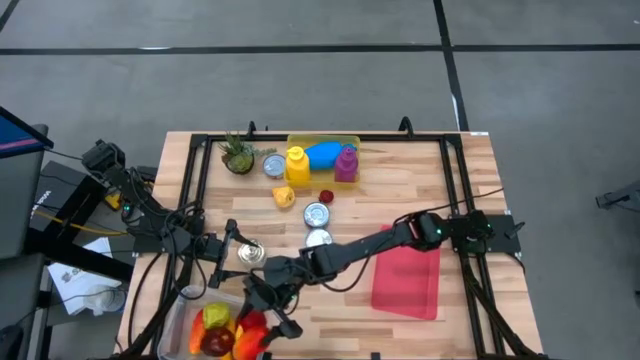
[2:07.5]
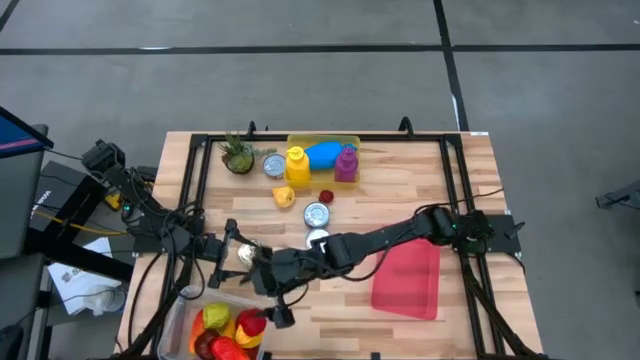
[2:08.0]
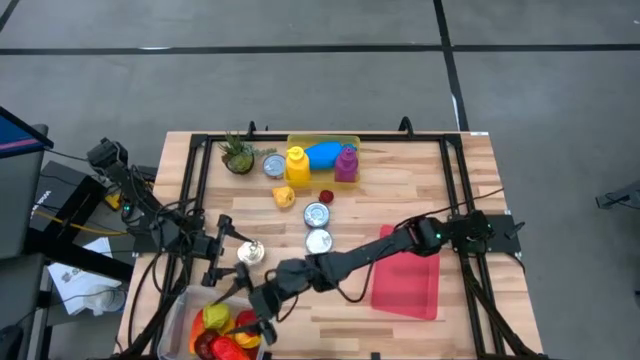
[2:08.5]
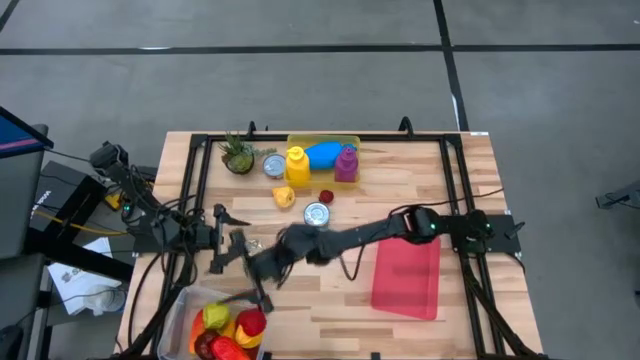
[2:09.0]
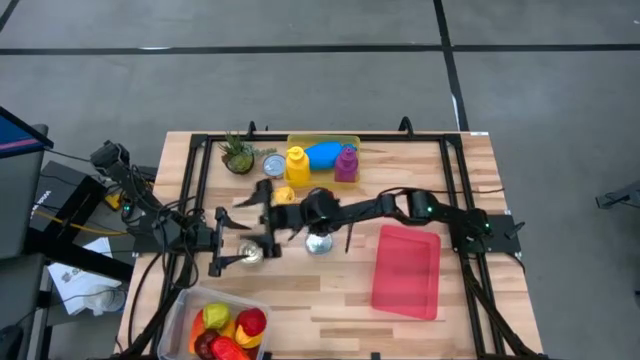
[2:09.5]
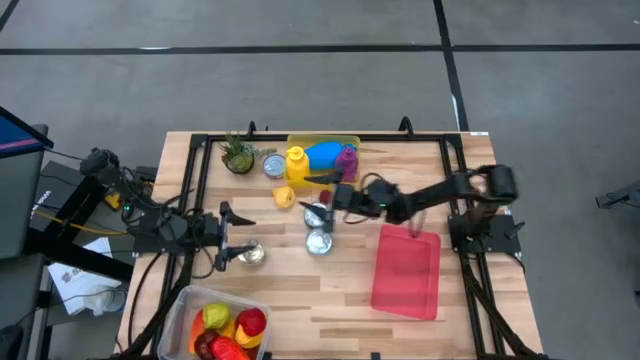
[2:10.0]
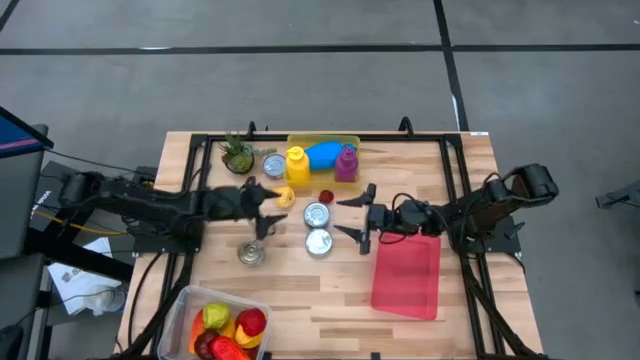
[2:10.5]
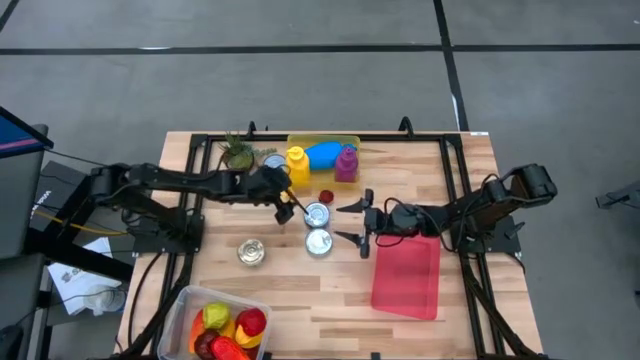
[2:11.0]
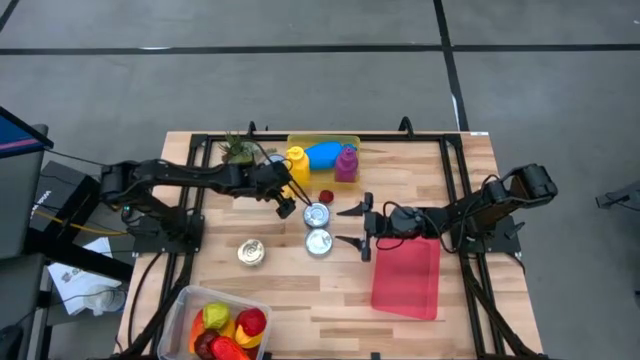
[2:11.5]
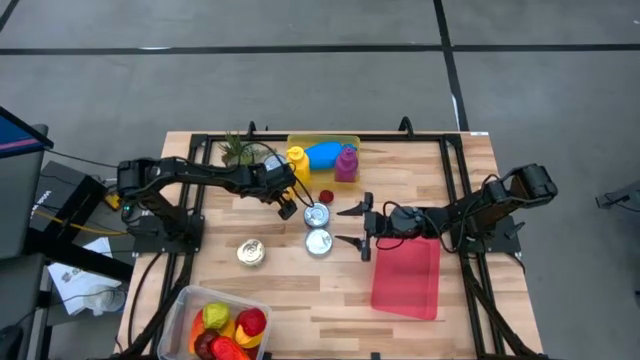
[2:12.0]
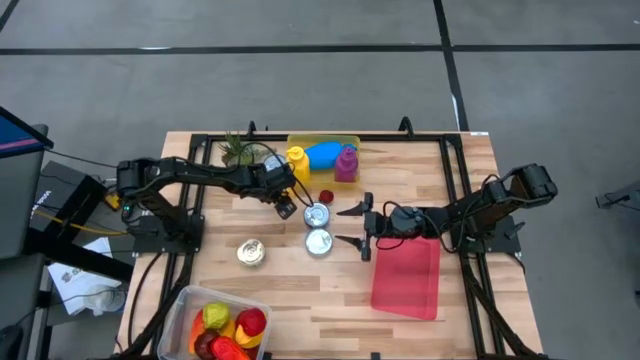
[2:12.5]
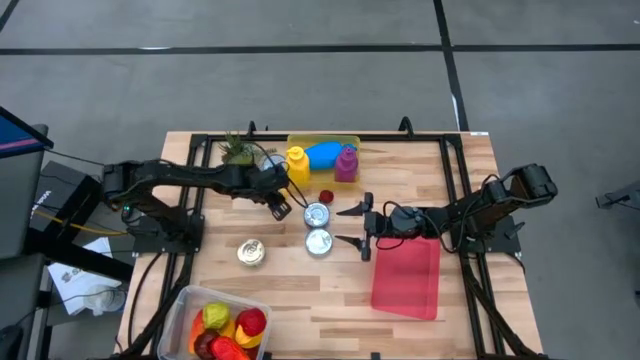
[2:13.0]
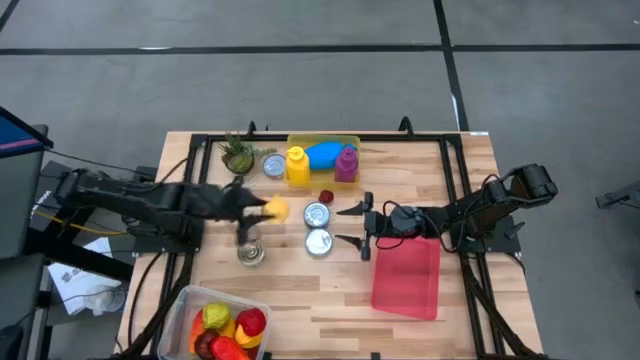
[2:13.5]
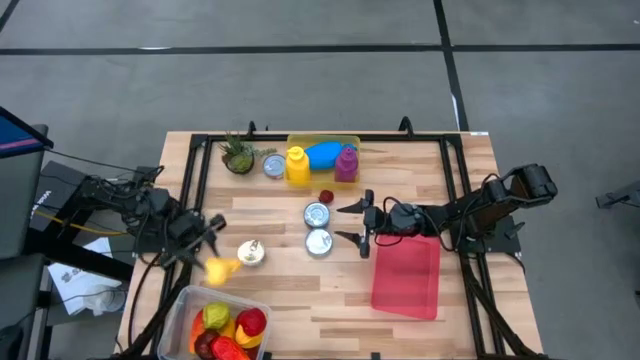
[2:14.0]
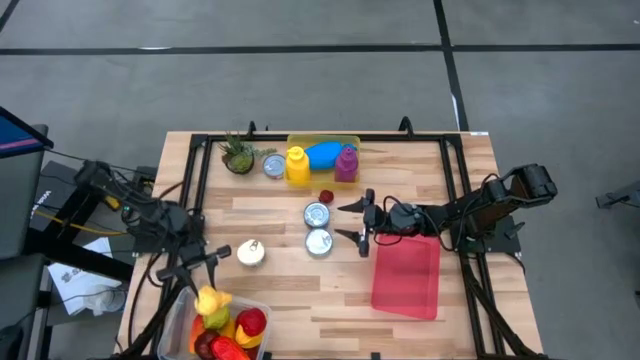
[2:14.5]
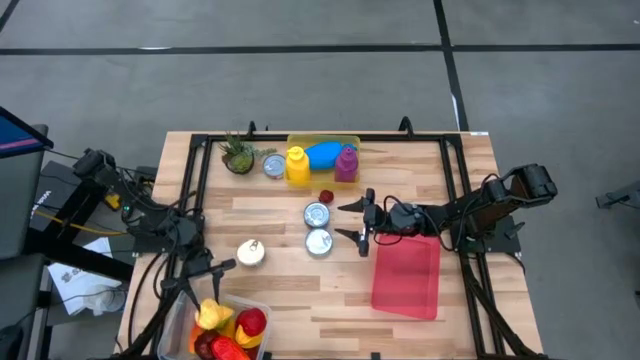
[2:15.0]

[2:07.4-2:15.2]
Task: Pick & Place Food Item
Put the yellow pear into the white bin

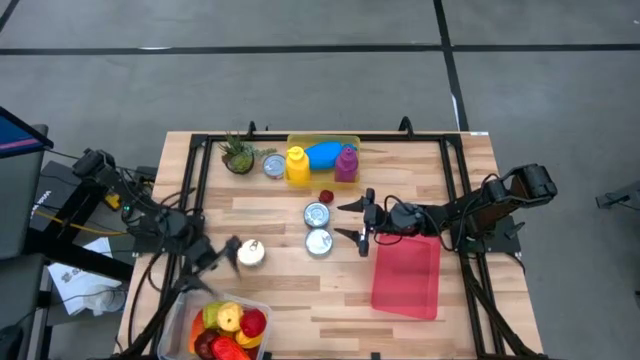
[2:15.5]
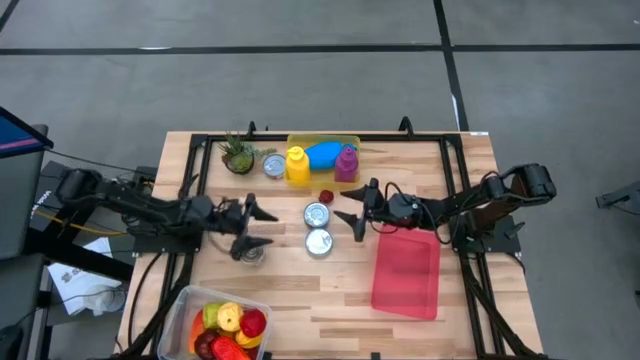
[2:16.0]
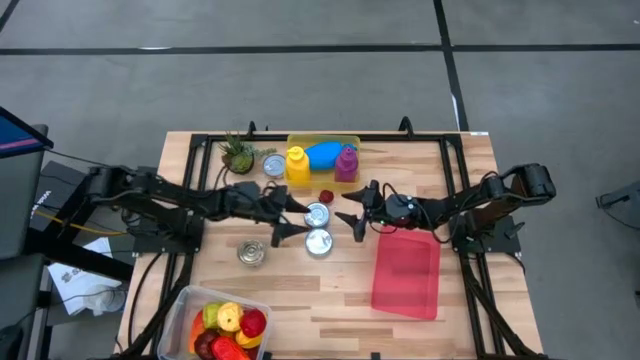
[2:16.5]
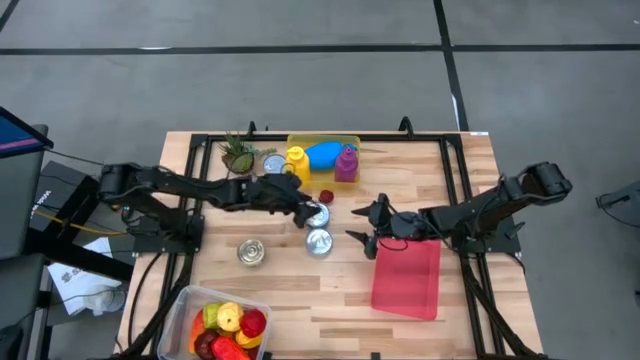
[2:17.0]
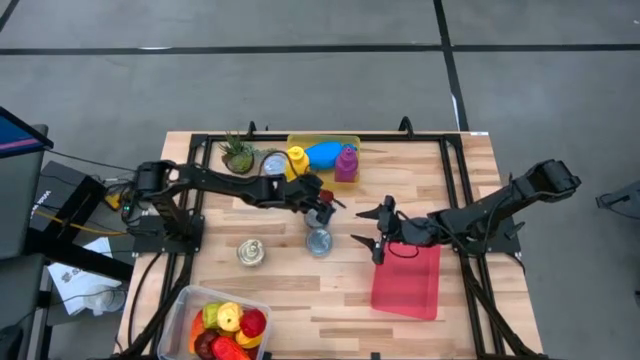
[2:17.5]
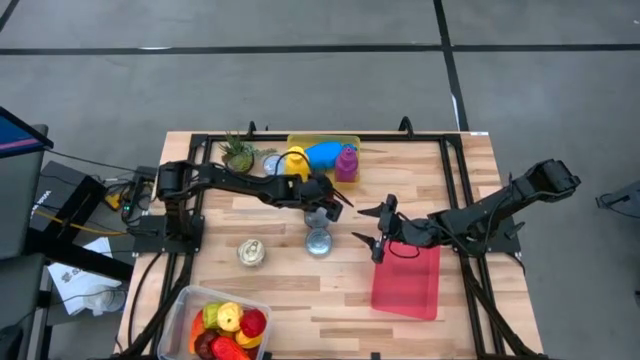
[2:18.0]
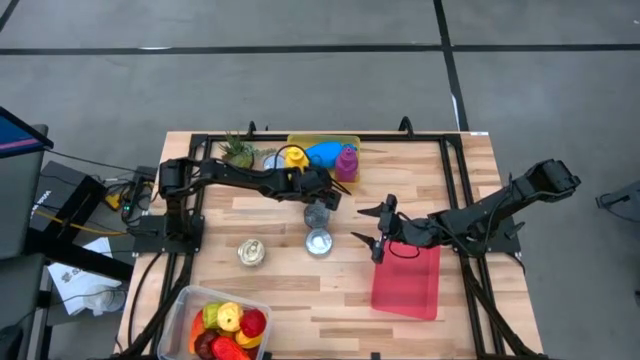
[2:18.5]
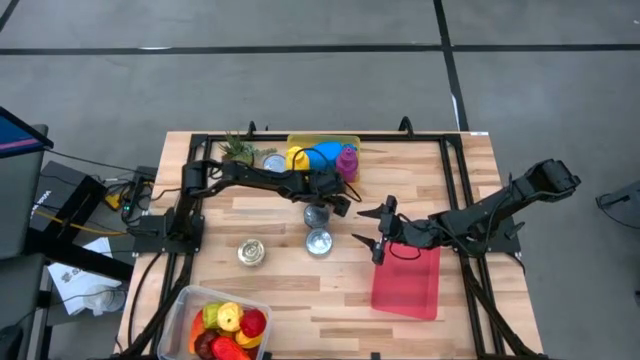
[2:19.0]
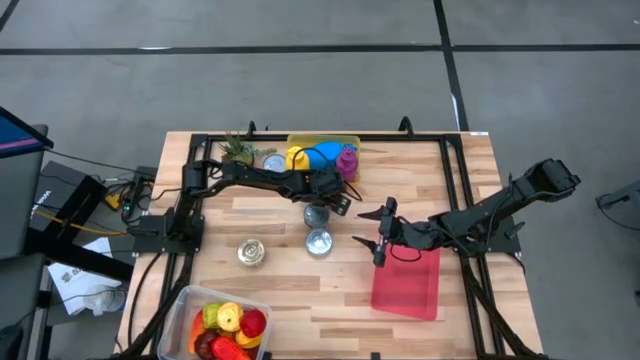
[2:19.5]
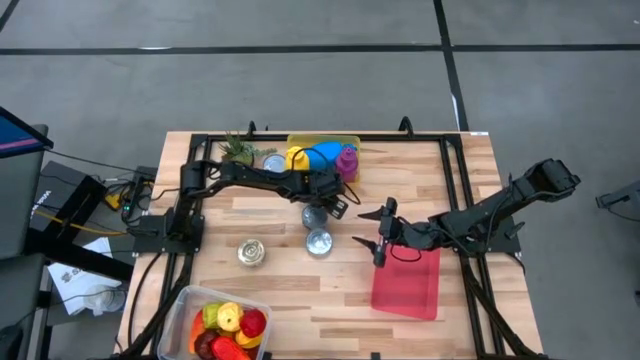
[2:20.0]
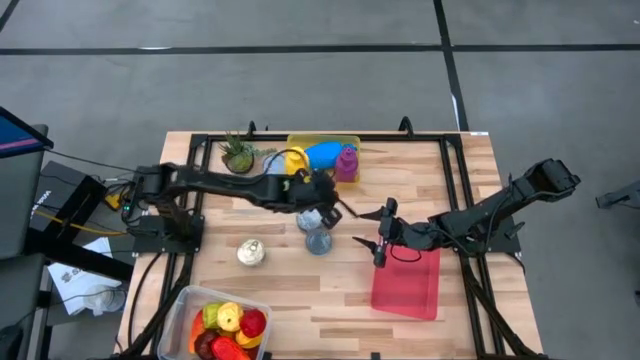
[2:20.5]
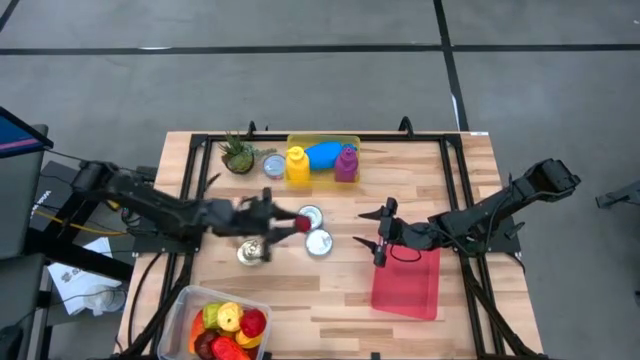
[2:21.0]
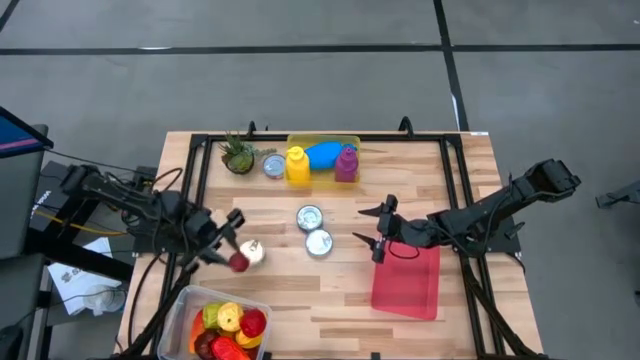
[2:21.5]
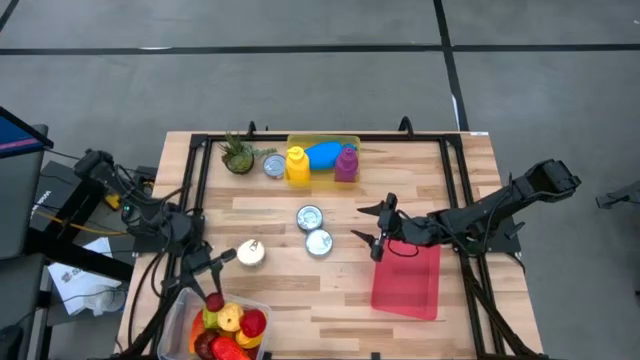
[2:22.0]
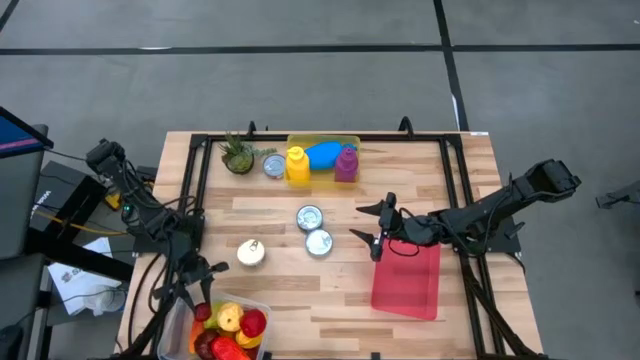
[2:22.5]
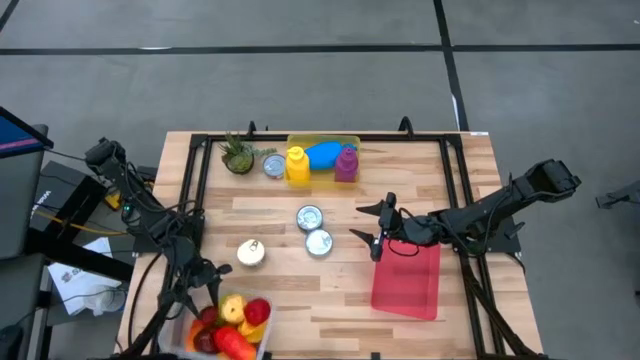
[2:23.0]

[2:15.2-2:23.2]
Put the red pomegranate into the white bin

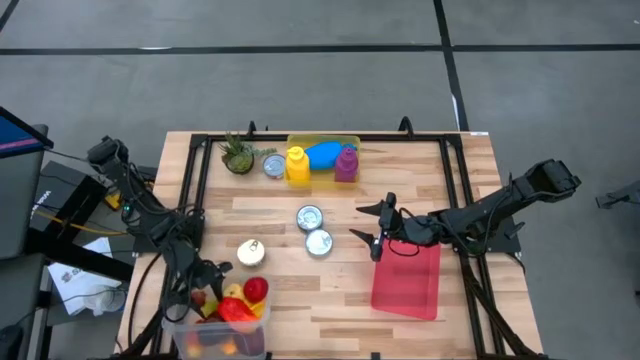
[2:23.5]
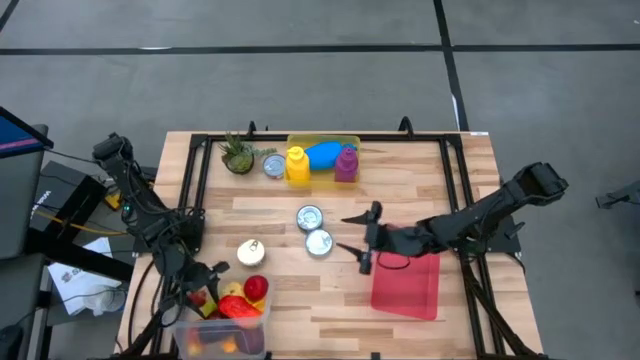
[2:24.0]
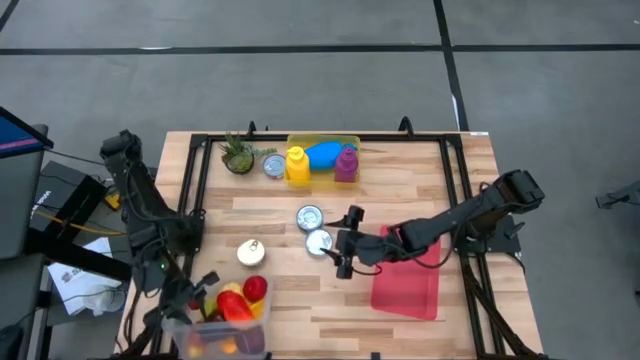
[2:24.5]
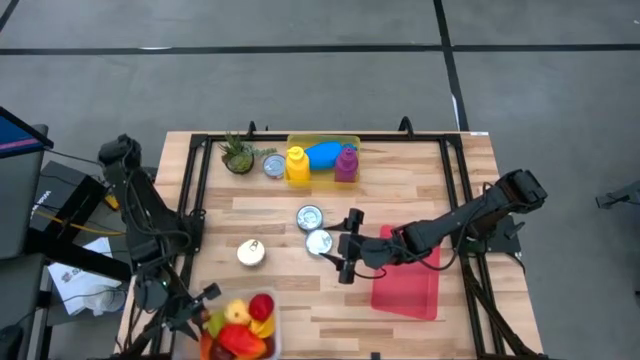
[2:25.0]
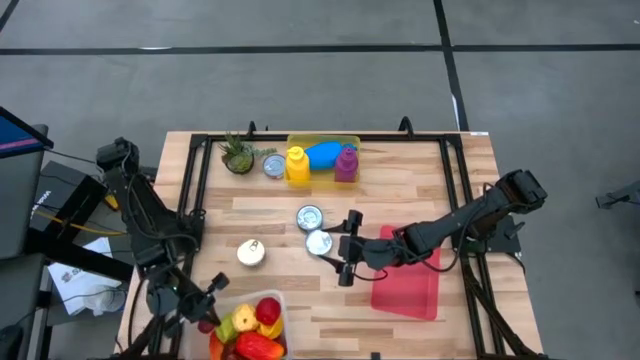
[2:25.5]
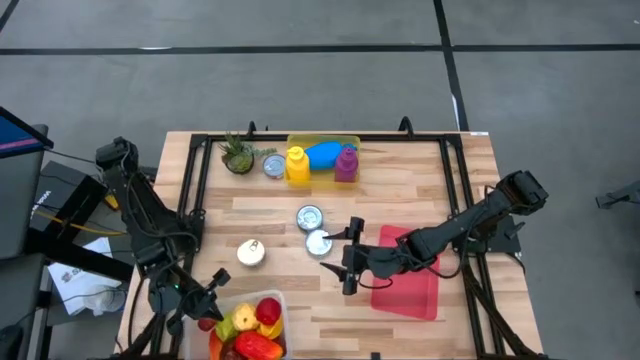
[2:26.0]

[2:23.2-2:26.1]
Adjust the white bin on the table

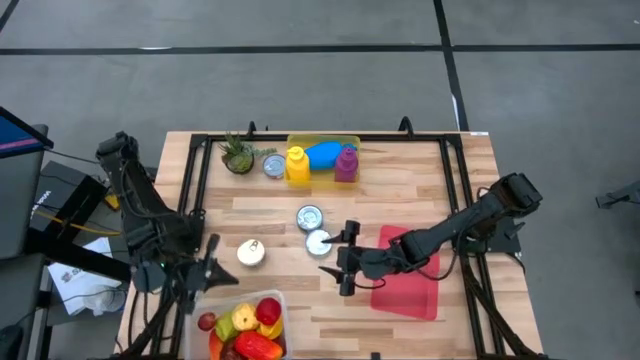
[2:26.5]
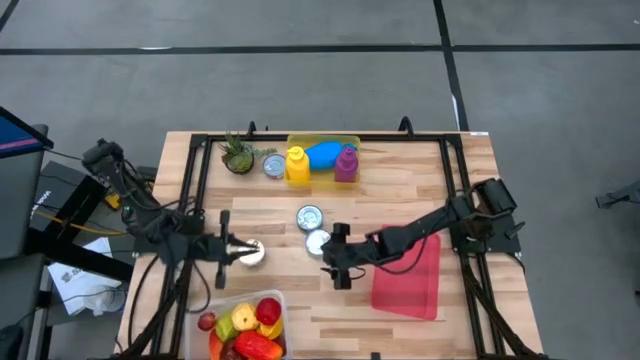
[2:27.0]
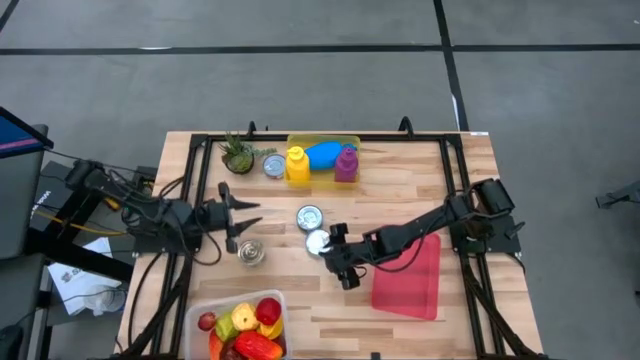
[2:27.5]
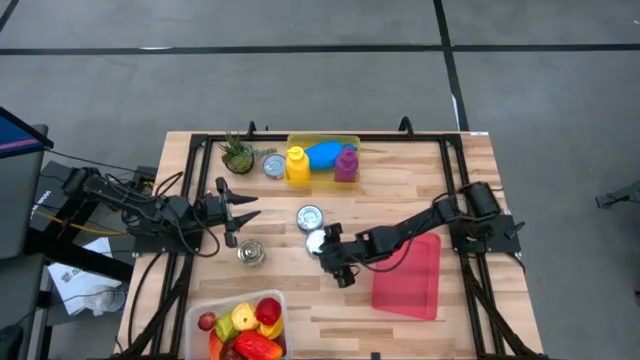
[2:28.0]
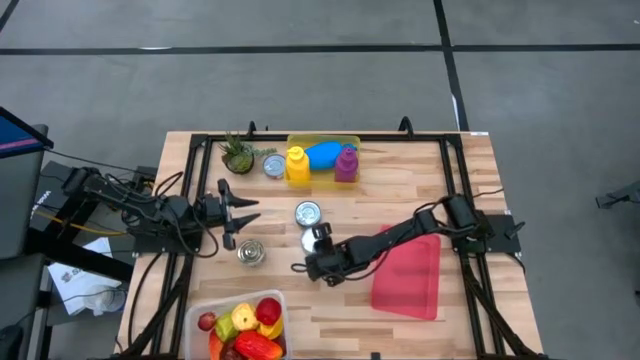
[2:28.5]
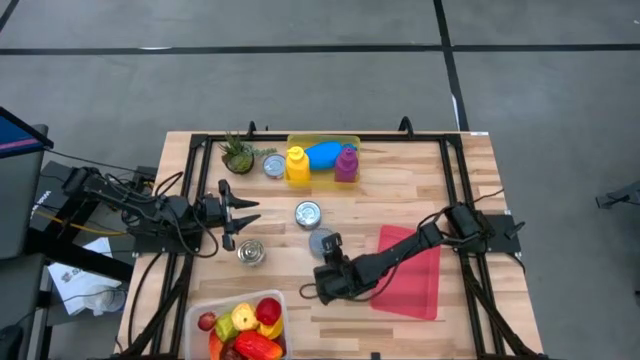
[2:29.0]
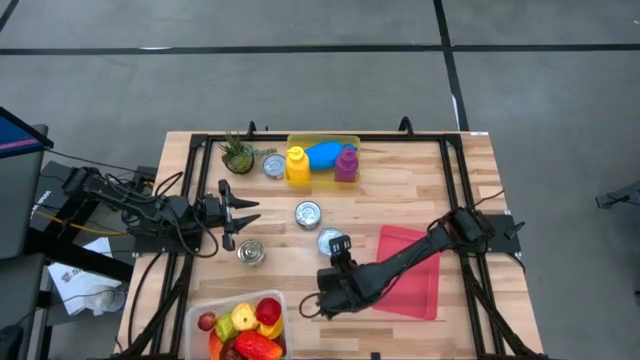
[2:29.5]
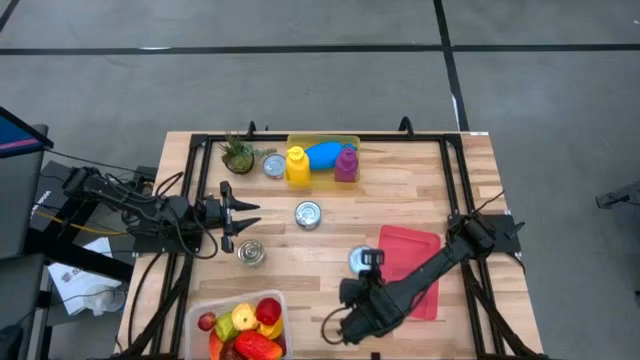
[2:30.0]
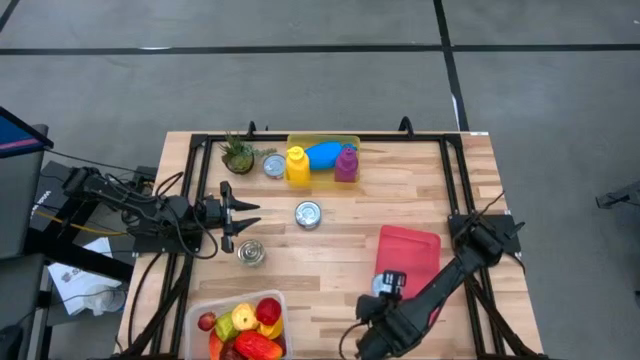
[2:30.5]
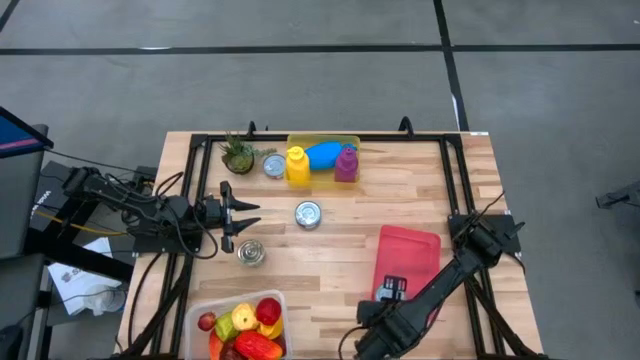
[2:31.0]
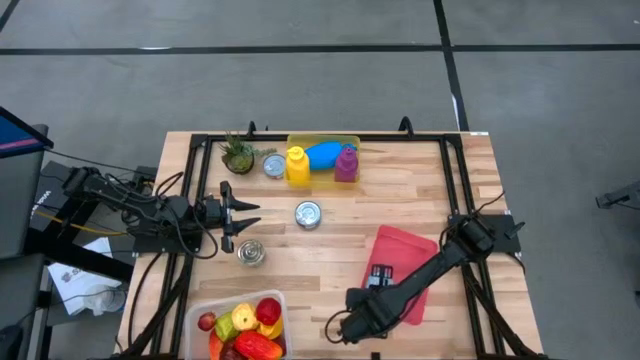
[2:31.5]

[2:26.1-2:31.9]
Put the green tuna can into the red bin
